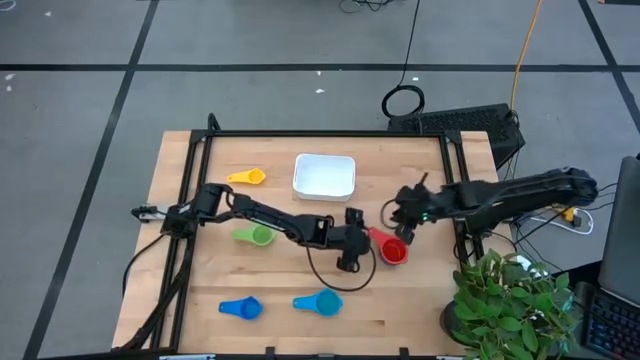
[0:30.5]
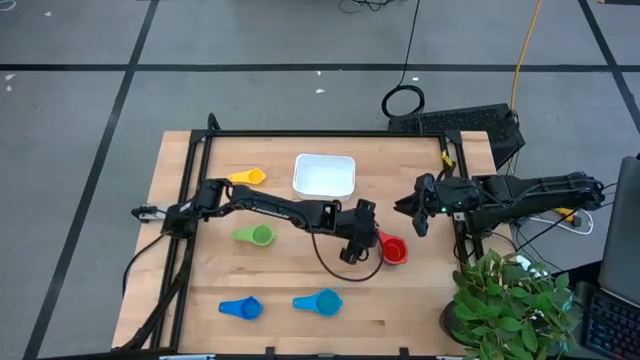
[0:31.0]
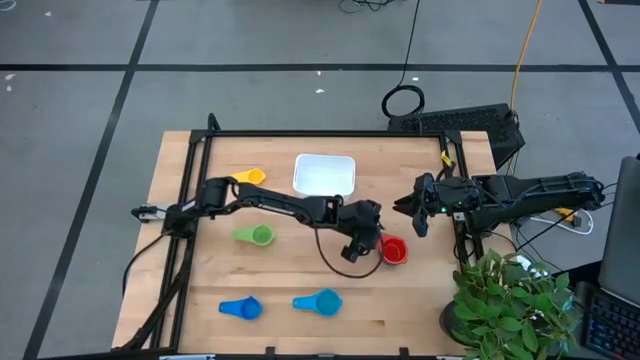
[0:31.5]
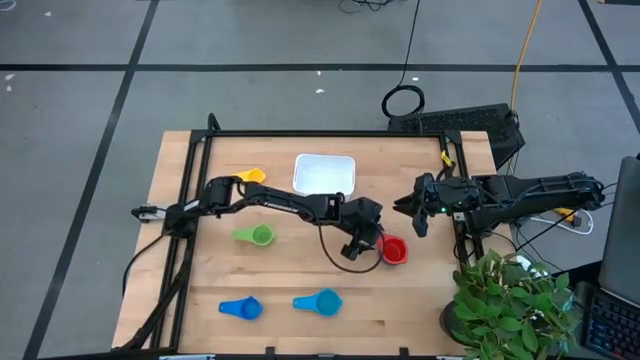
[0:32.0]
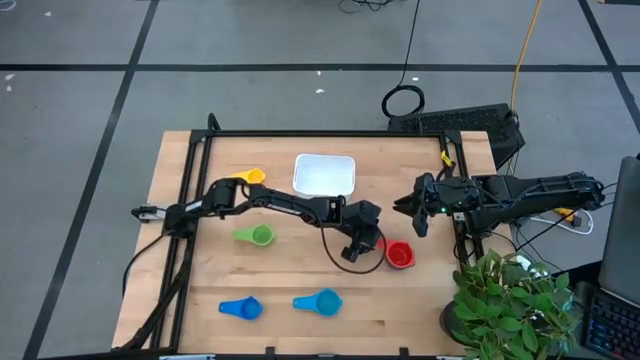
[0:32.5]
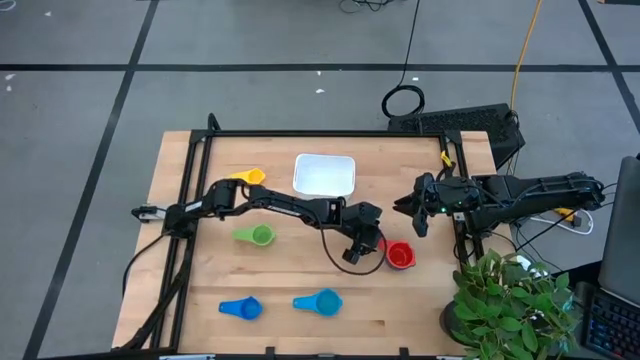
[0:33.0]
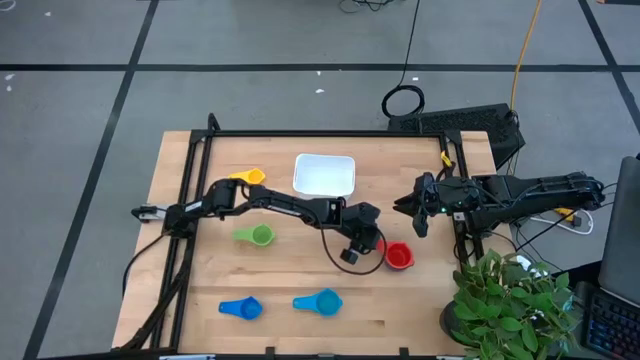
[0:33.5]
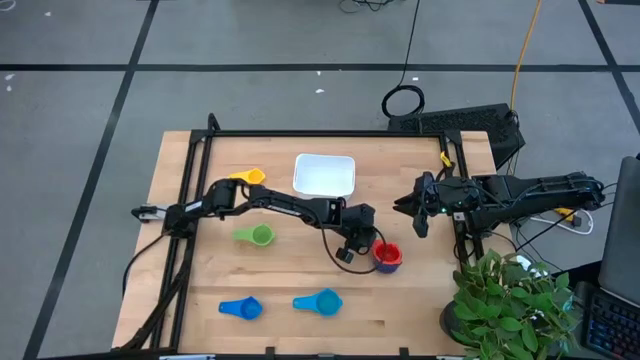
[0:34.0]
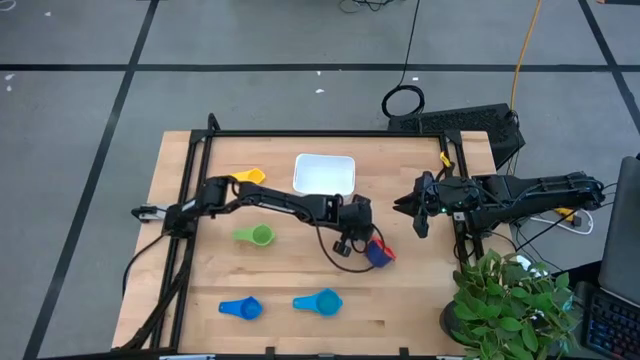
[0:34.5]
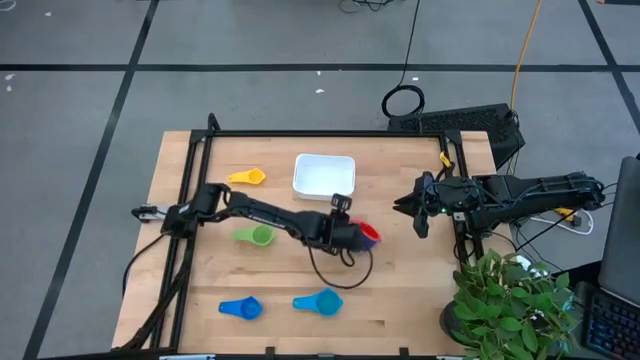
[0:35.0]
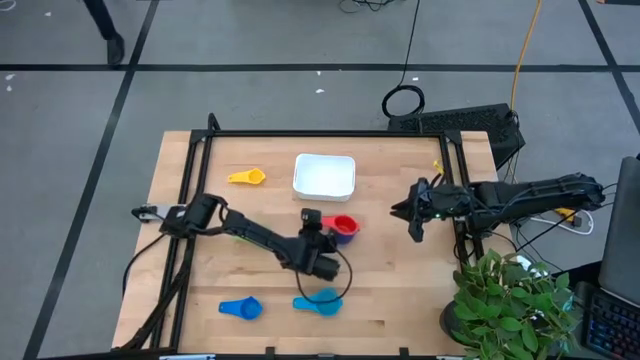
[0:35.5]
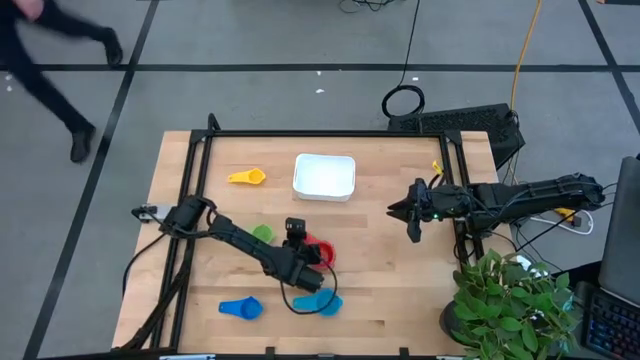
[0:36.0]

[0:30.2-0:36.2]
Task: Nest measuring cups in basket
Move the stacked measuring cups to the center of the table

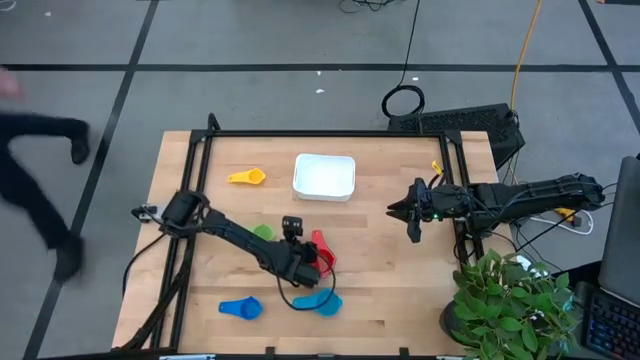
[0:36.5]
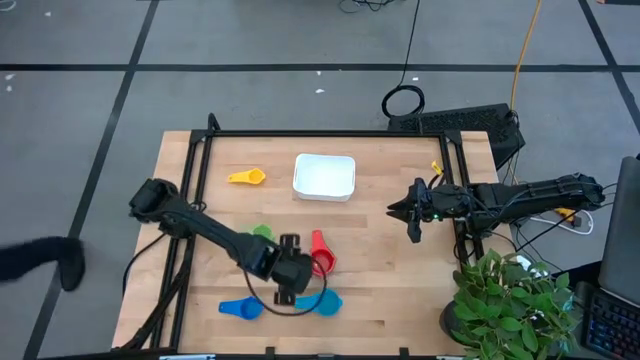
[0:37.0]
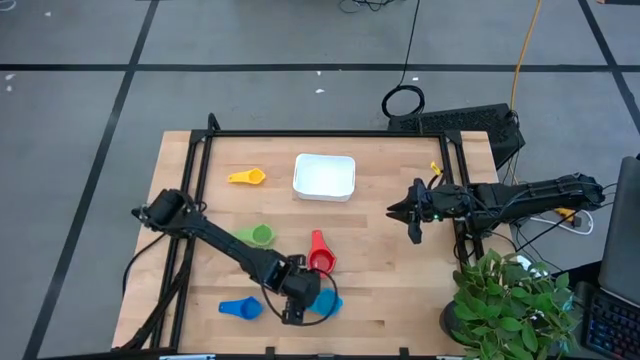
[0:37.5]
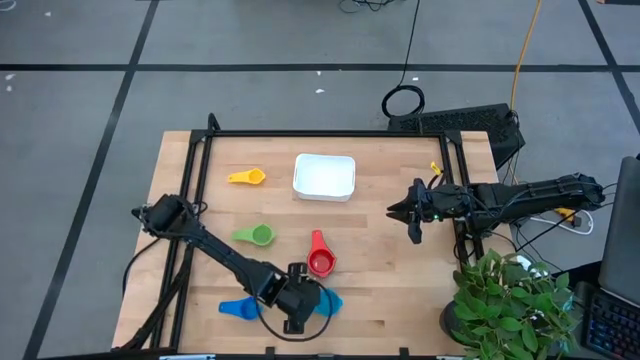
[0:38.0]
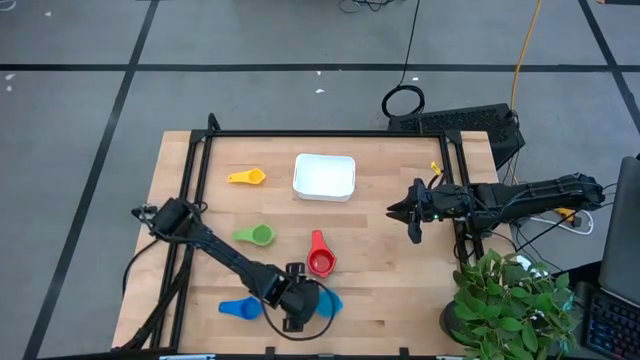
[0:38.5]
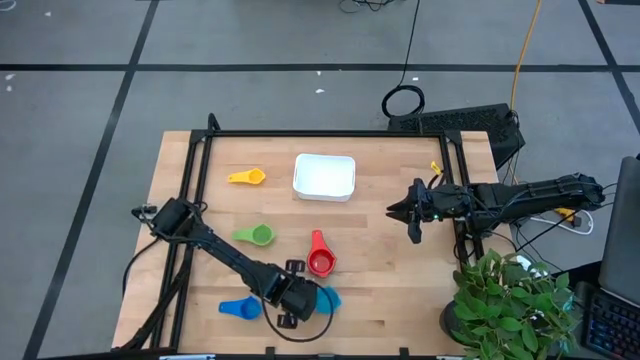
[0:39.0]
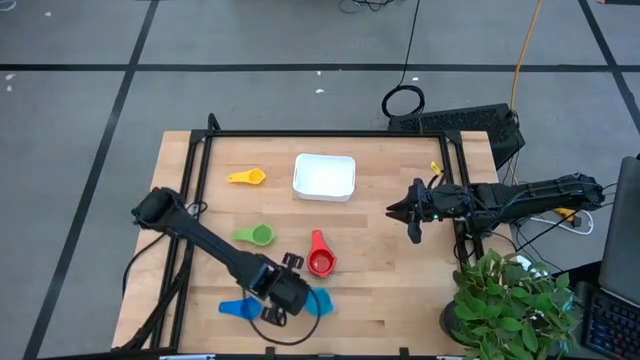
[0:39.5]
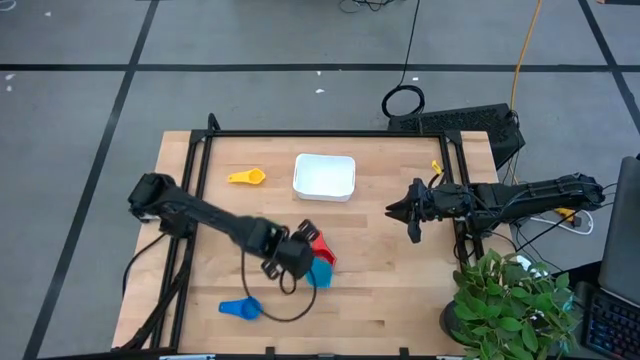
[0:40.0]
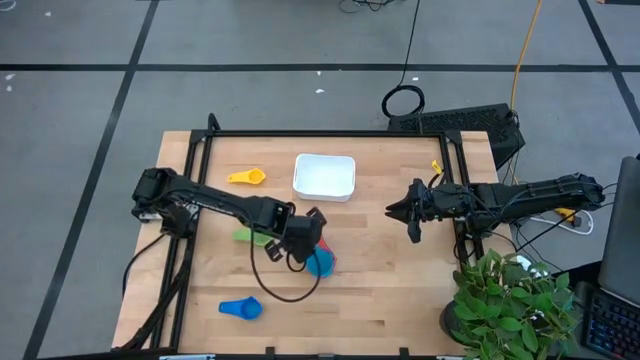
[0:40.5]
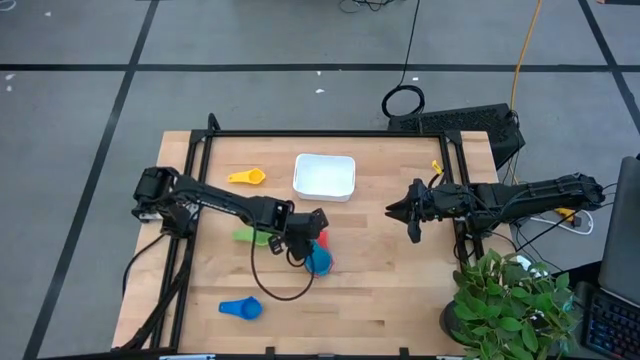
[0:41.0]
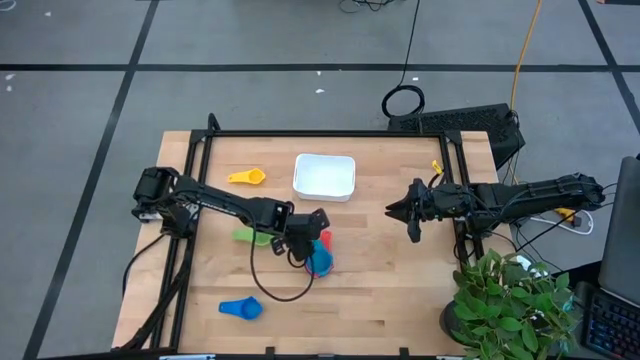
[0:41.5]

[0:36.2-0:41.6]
Stack the light blue measuring cup on top of the red measuring cup

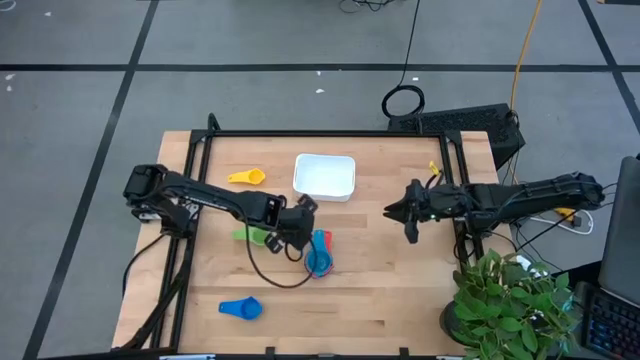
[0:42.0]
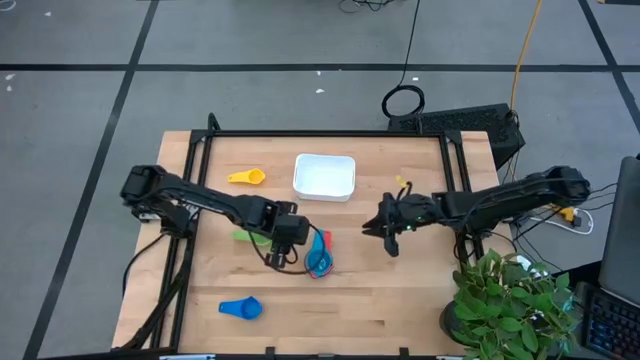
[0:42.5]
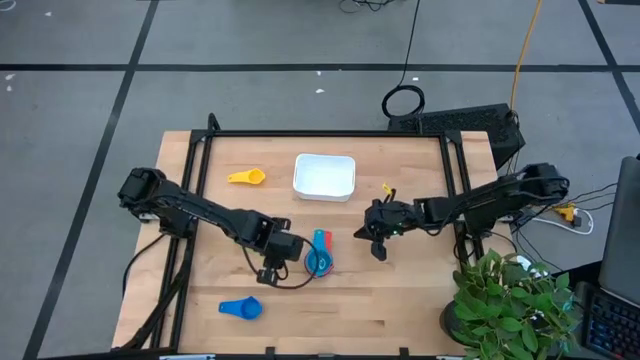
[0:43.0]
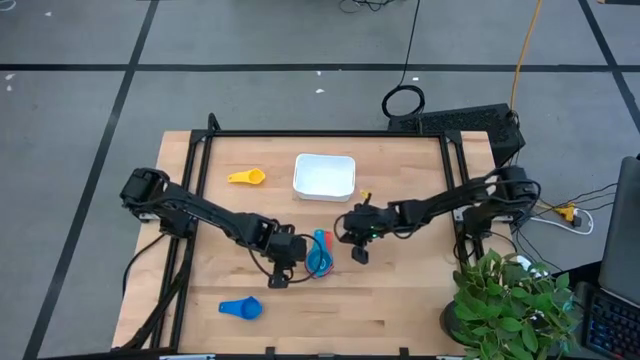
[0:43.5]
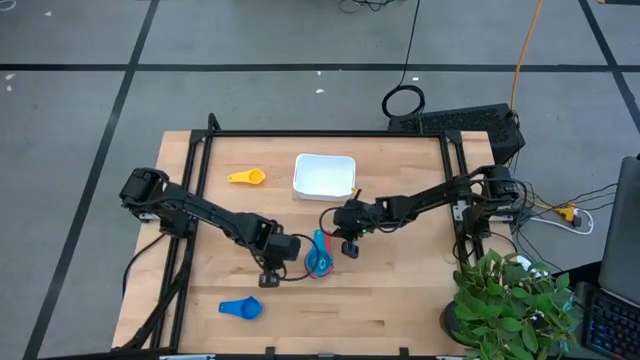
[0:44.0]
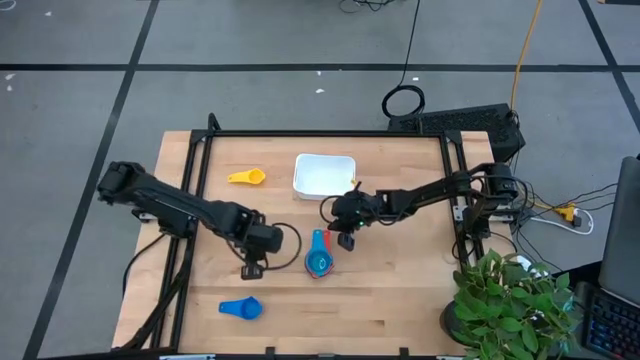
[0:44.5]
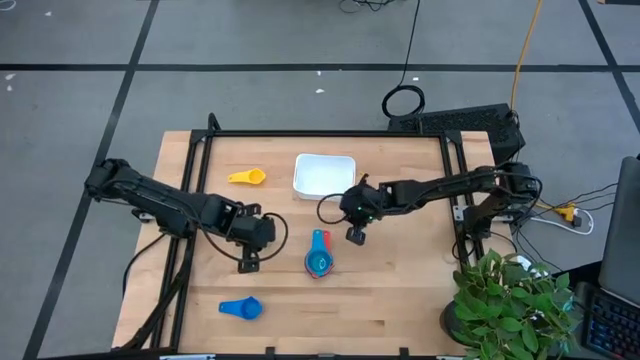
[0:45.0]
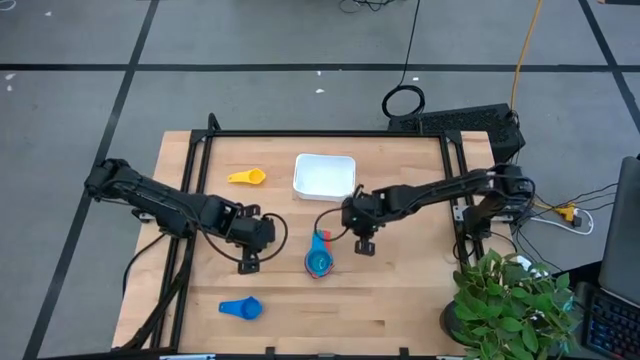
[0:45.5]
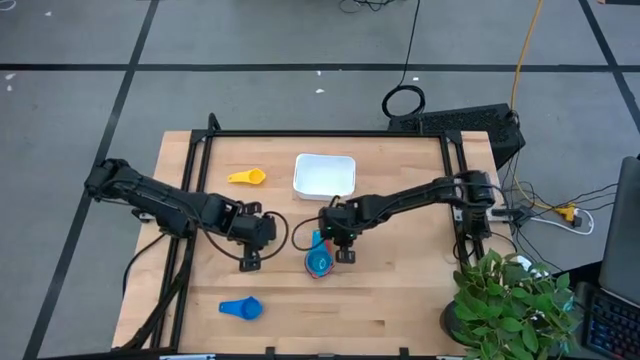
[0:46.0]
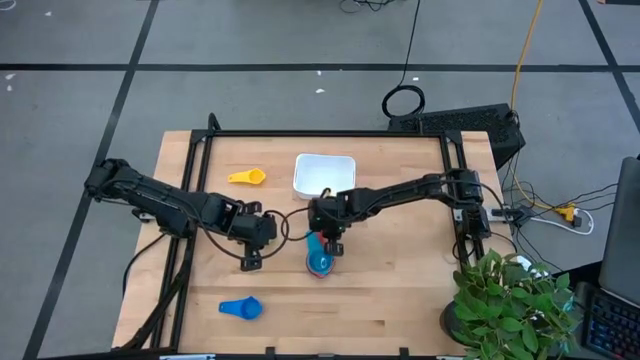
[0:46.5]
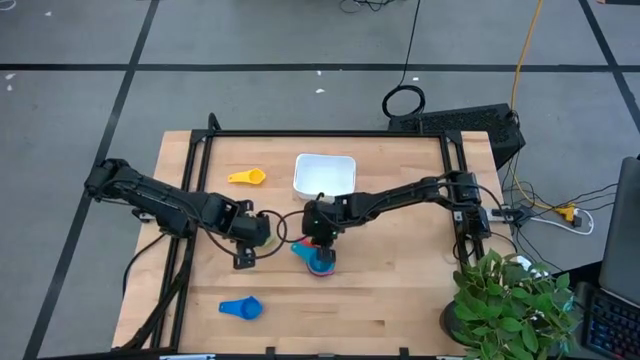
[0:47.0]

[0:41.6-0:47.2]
Adjust the stacked measuring cups

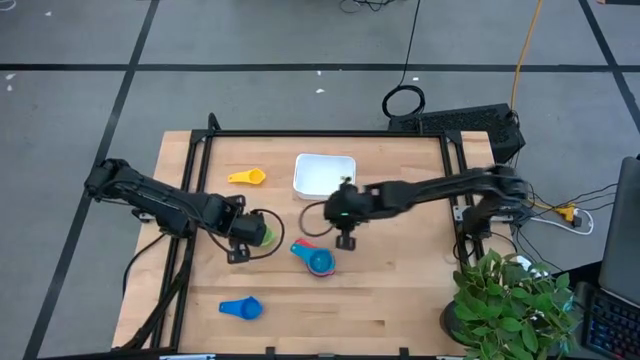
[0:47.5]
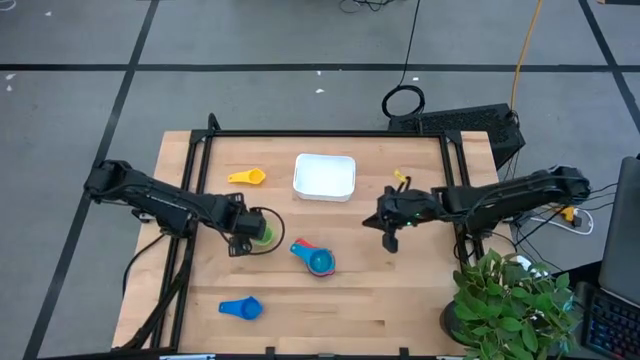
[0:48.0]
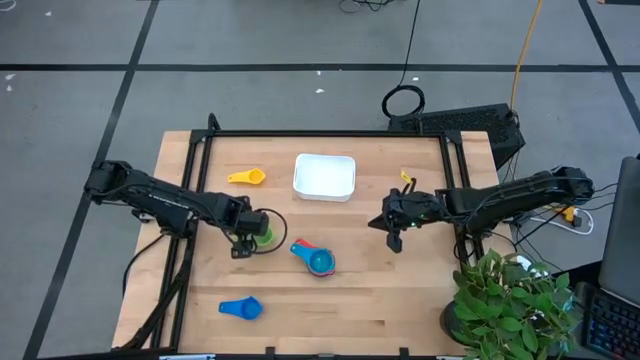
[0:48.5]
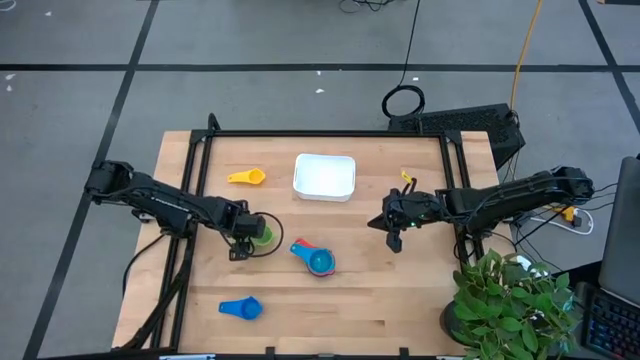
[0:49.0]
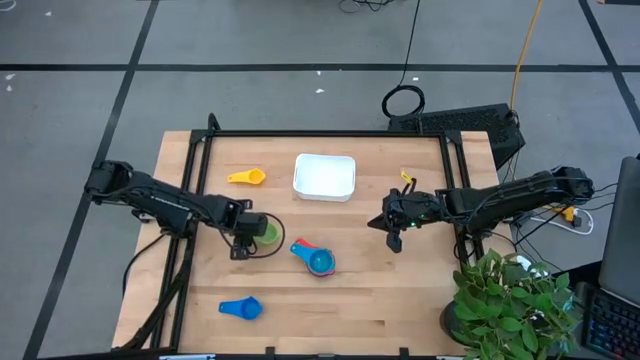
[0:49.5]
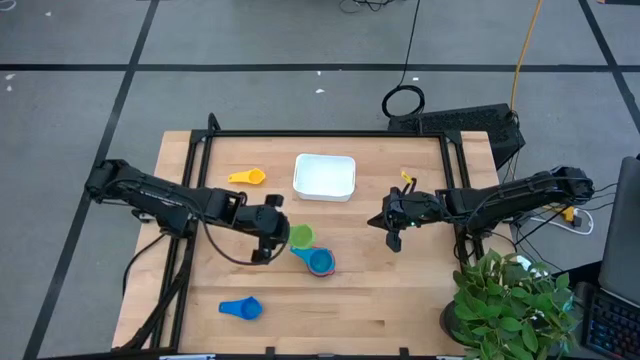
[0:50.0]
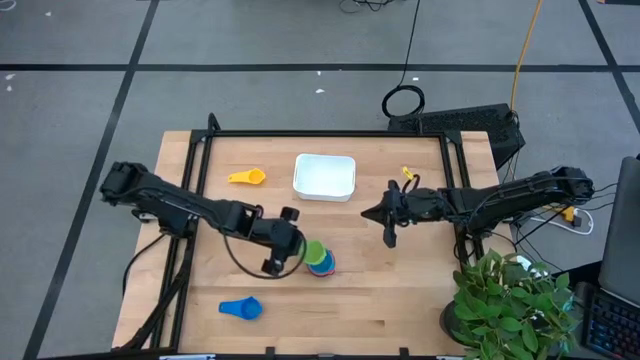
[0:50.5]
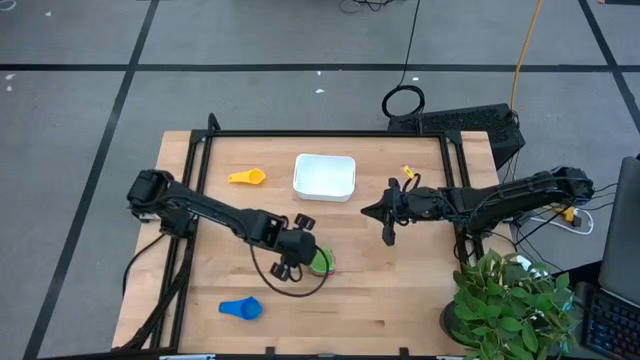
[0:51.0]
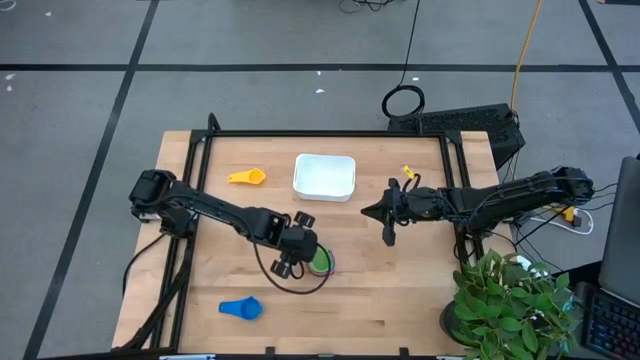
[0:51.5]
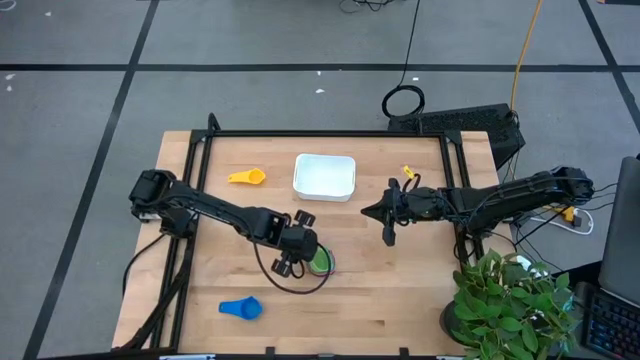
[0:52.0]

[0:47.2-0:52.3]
Stack the green measuring cup on top of the blue measuring cup
